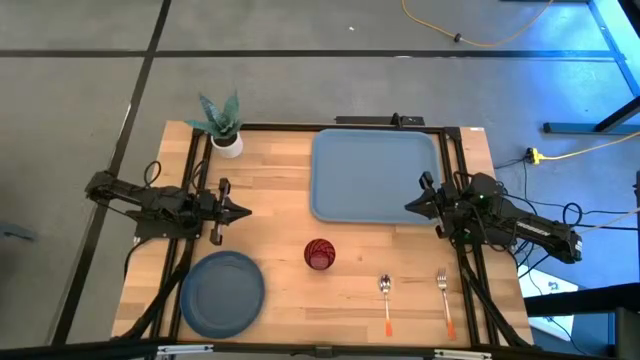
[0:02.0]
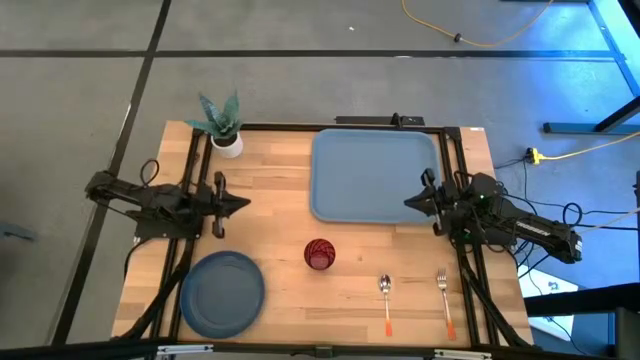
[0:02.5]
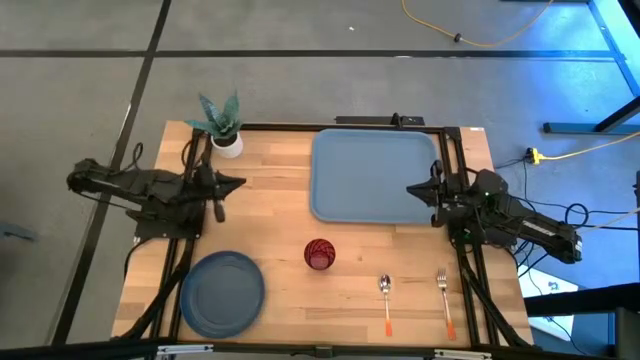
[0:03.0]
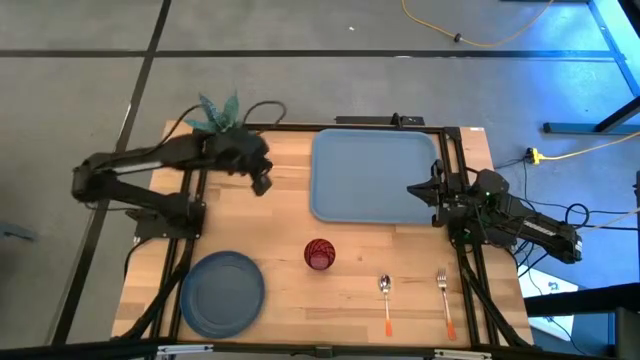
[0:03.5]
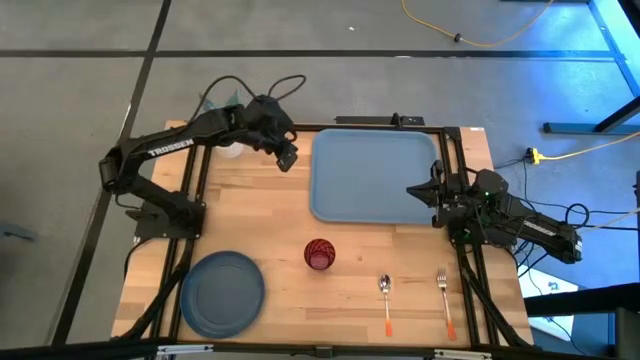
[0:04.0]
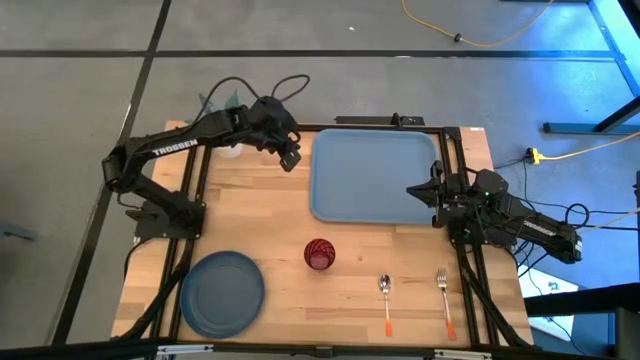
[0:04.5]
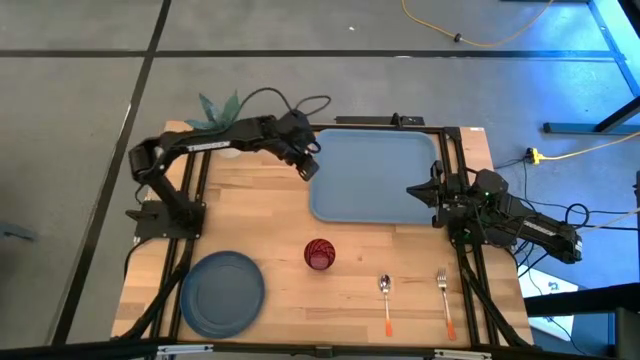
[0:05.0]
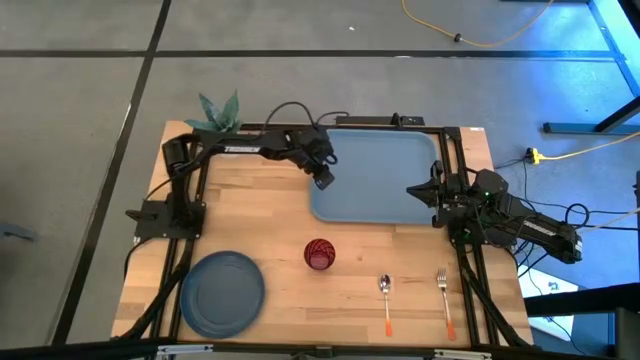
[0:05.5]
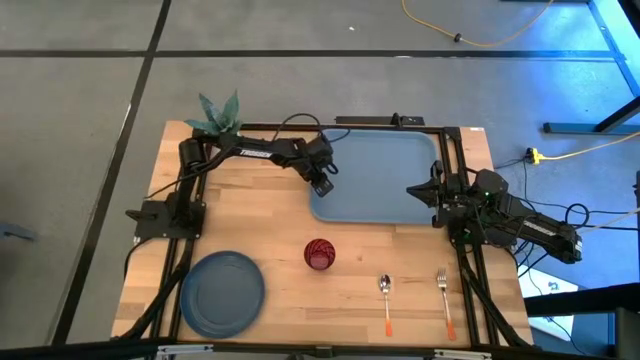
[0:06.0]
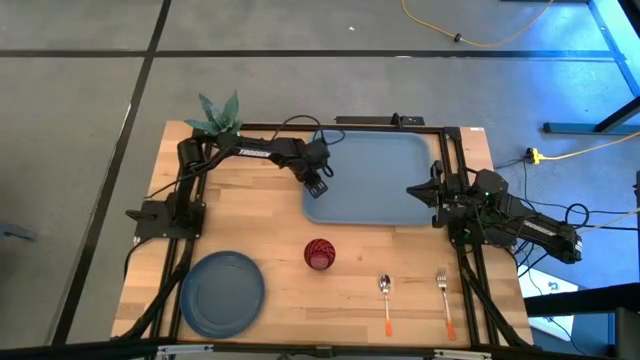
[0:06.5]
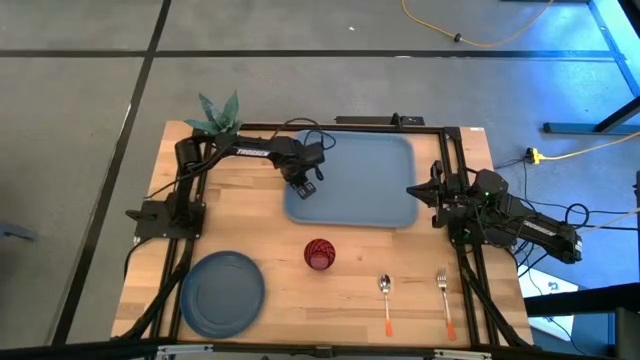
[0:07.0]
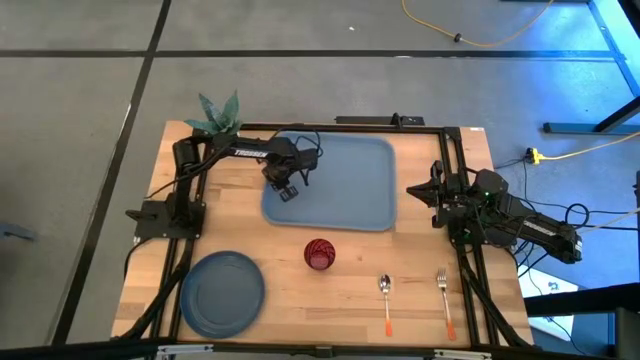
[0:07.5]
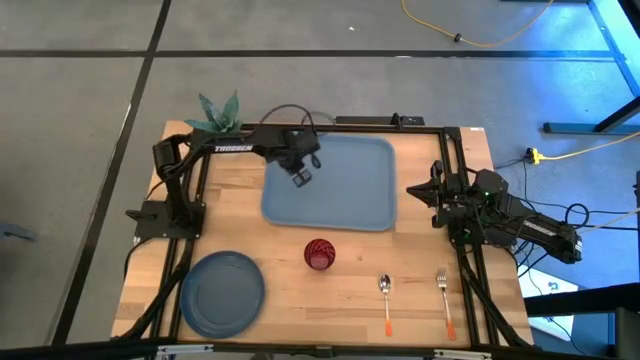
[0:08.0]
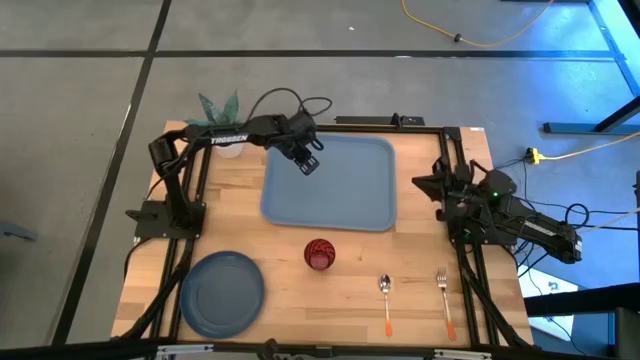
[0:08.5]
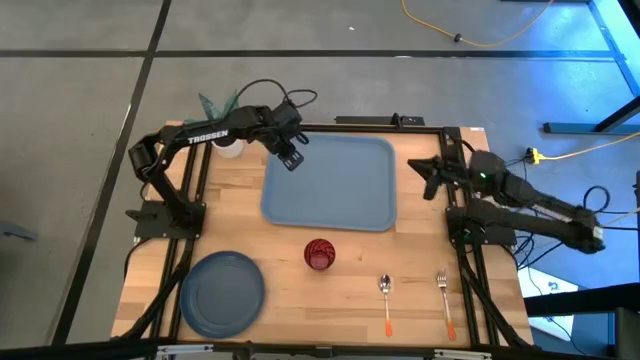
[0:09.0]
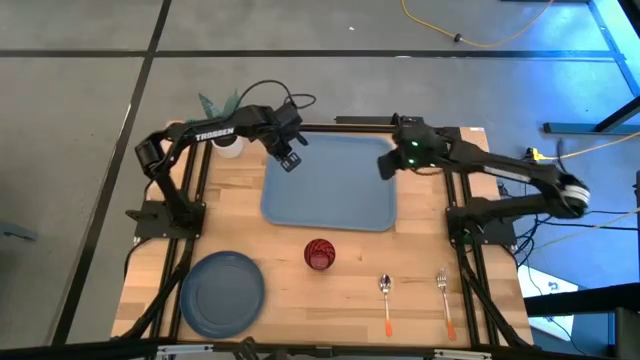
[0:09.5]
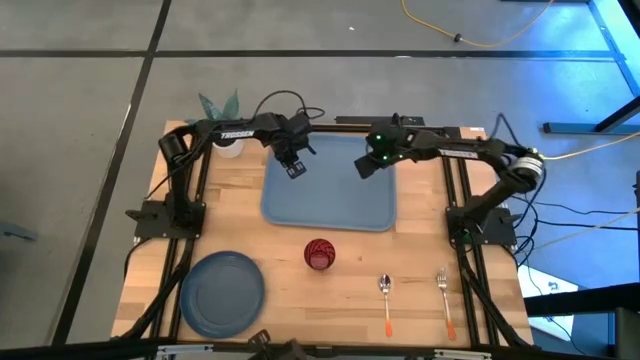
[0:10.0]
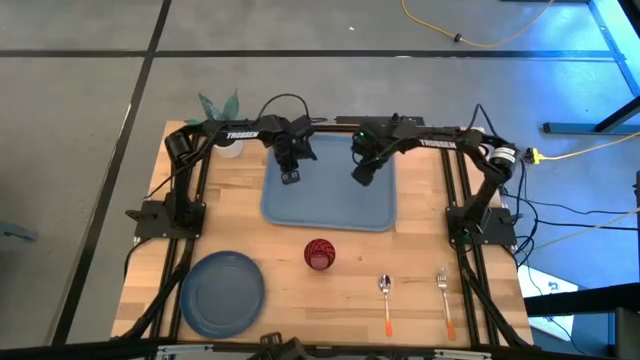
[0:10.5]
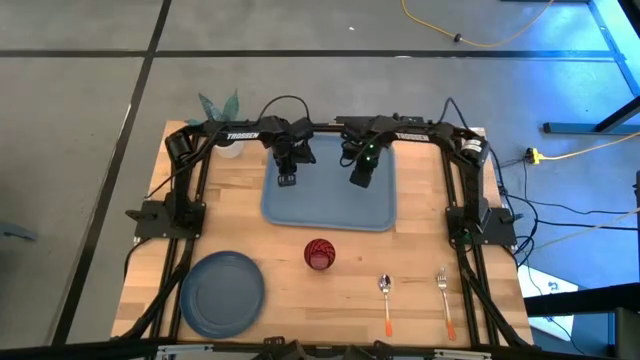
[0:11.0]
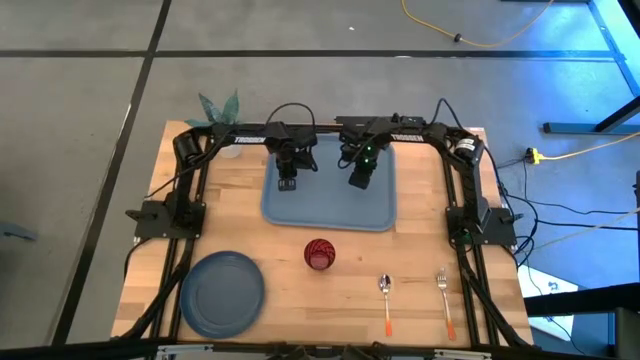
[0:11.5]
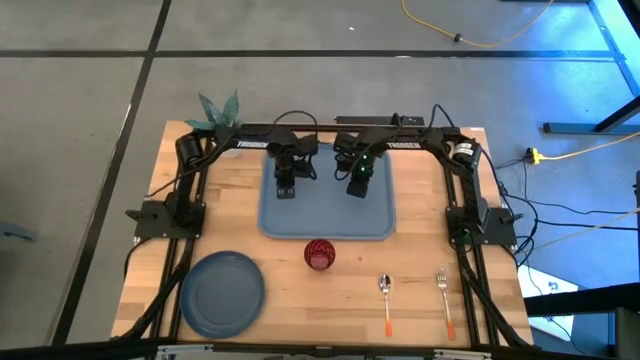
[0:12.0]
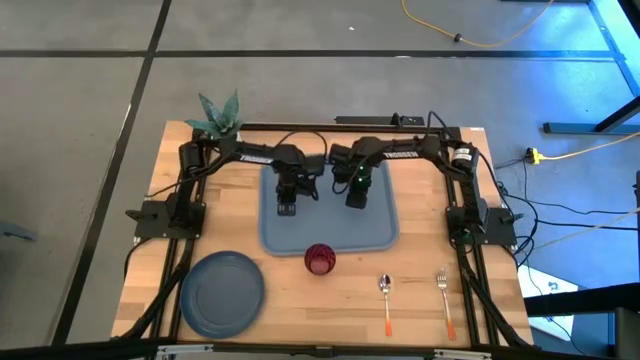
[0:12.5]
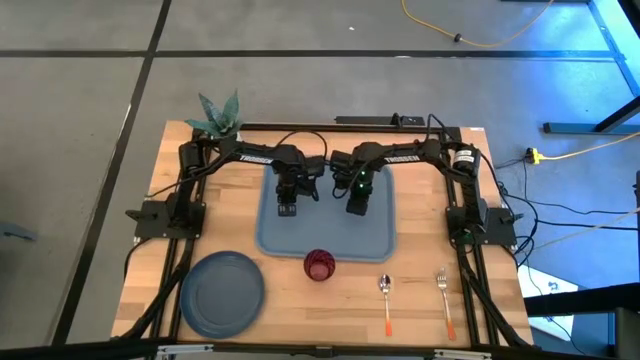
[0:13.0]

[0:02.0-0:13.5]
Task: Pick and place plate/cup/fork/spoon on tray
Move the blue tray to the center of the table

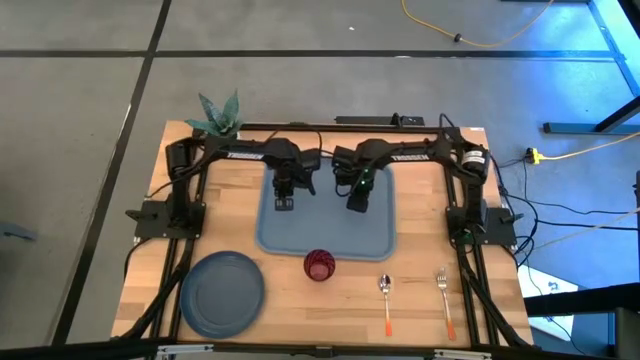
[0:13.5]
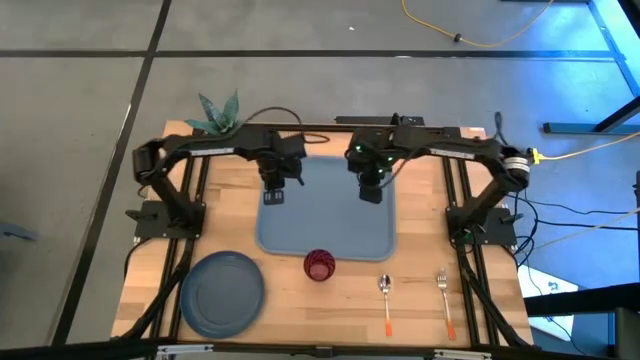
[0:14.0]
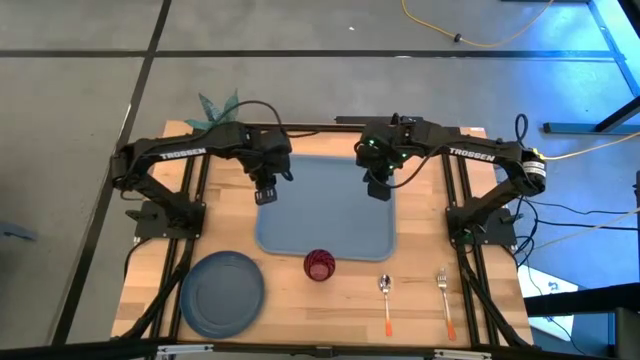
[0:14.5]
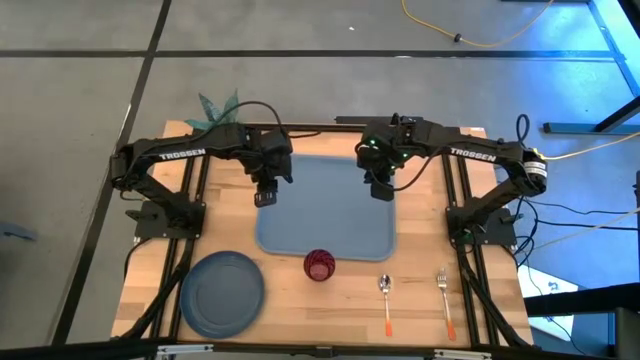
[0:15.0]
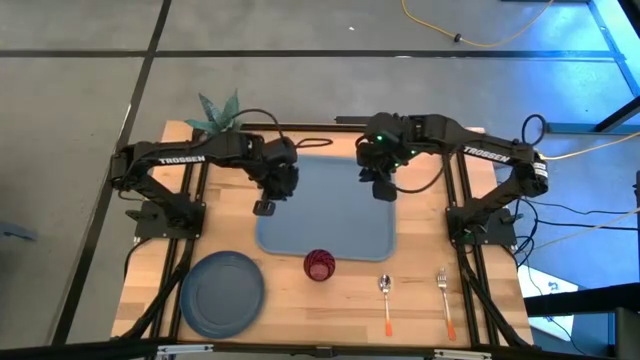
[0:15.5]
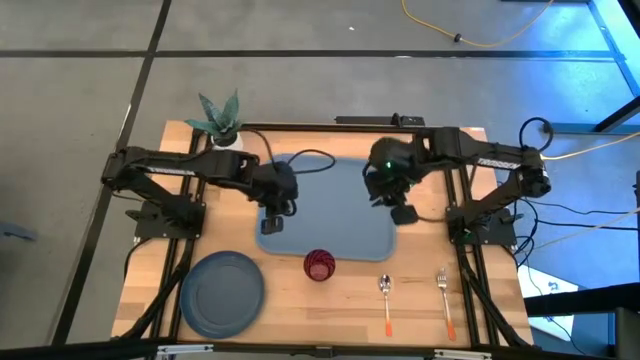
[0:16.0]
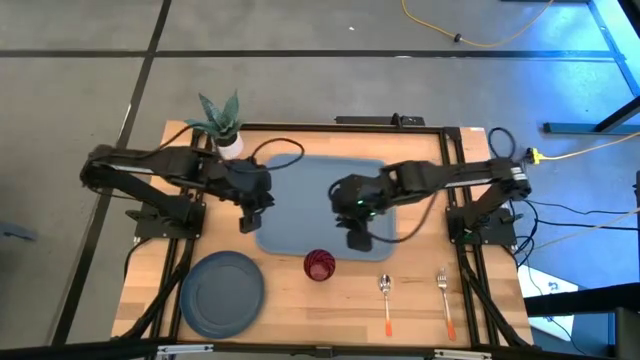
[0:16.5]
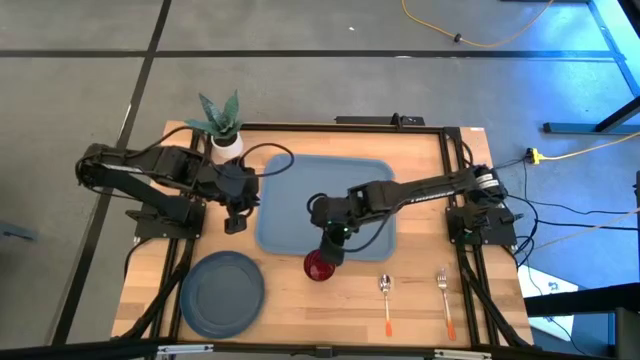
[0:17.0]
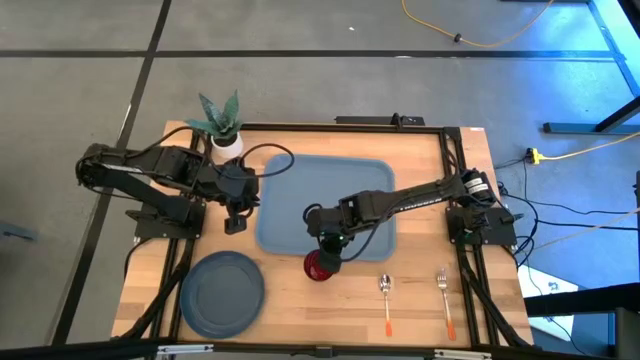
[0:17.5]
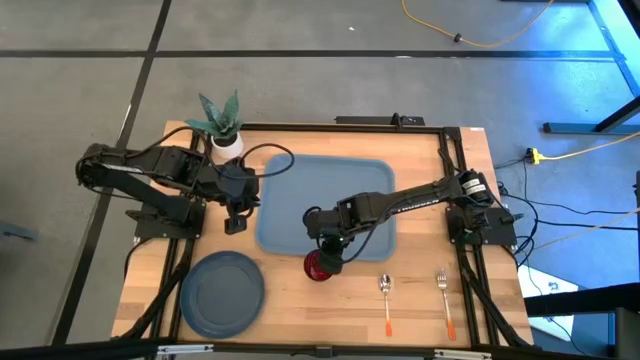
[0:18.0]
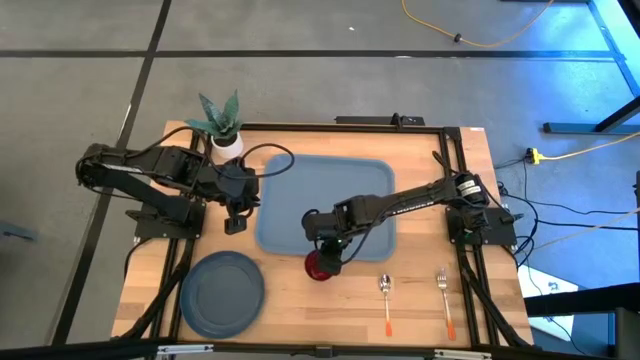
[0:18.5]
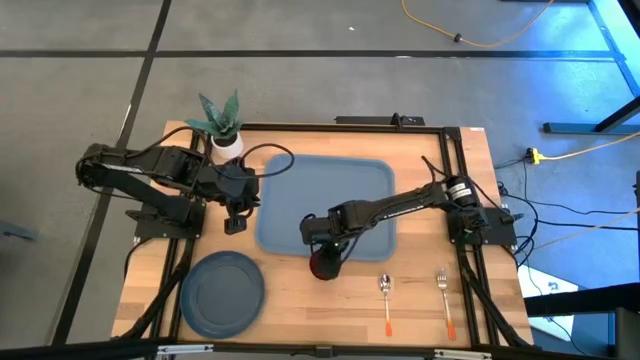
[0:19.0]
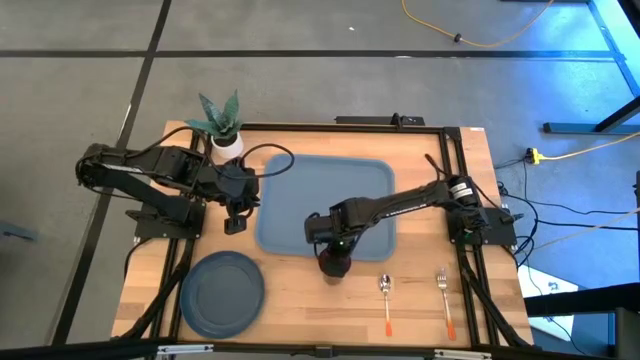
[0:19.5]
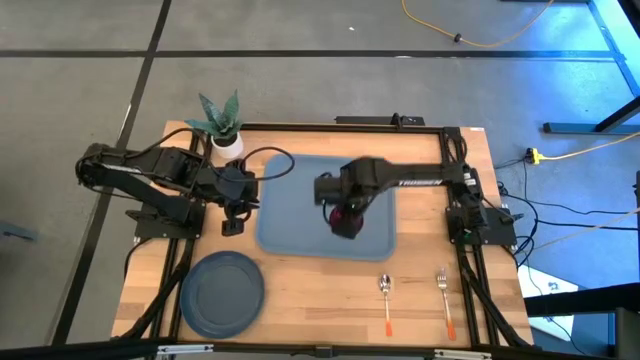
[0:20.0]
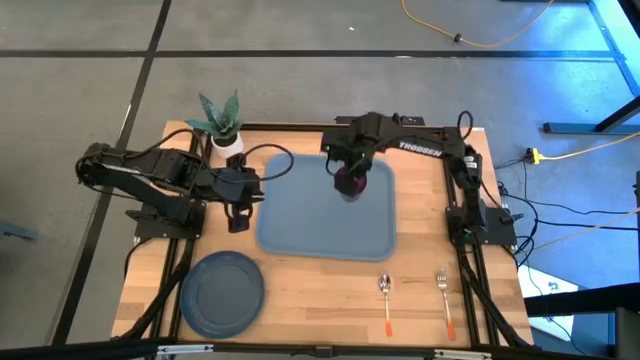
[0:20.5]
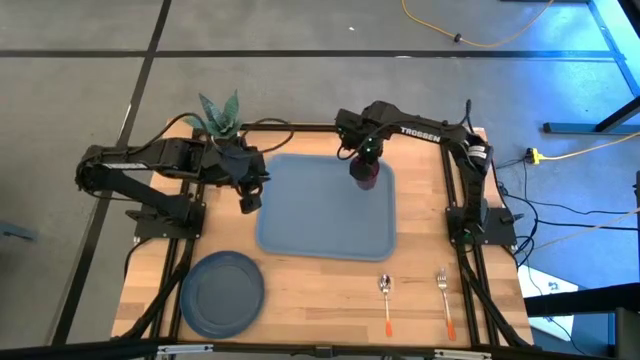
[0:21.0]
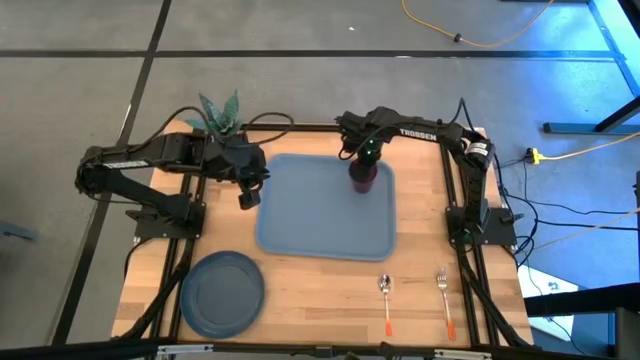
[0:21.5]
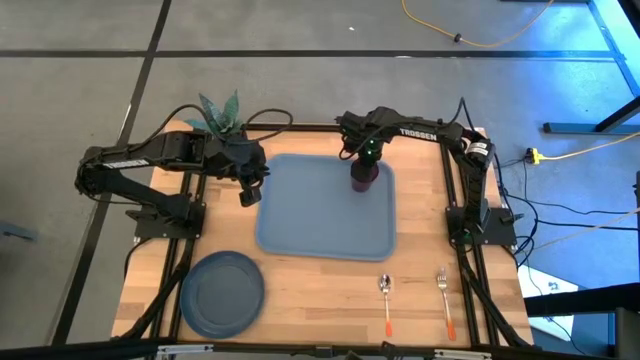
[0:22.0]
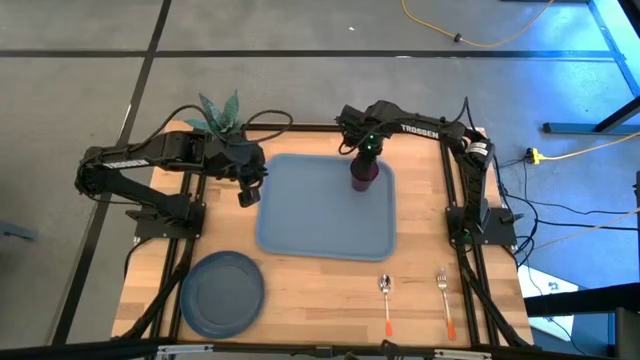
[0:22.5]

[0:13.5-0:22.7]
Put the dark red glass on the blue tray

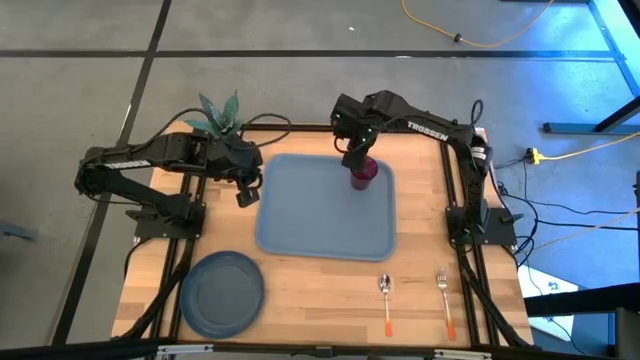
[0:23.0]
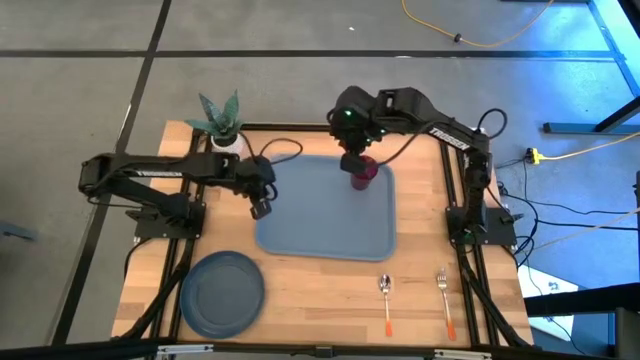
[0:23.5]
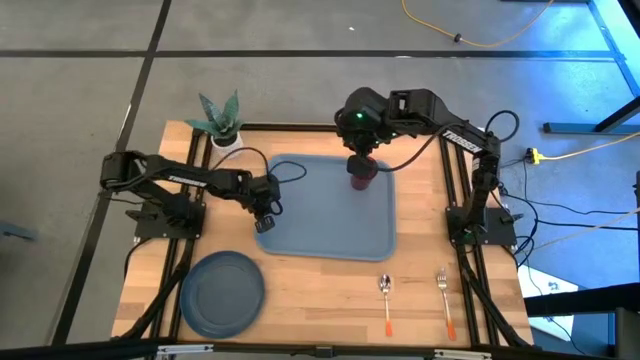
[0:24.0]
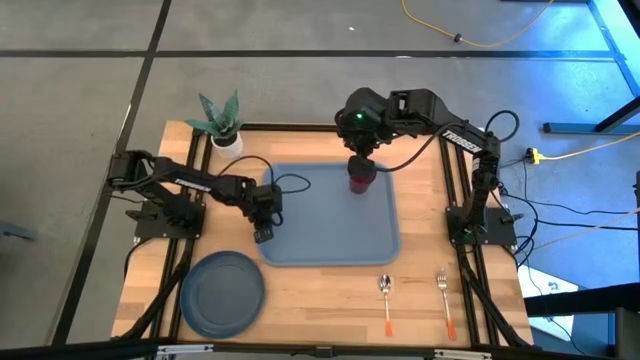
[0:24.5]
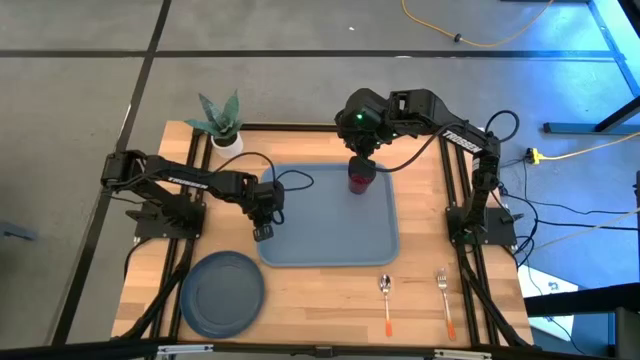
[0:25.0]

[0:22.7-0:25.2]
Adjust the blue tray on the table
